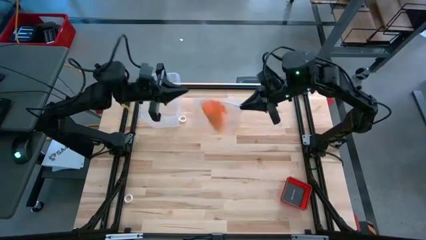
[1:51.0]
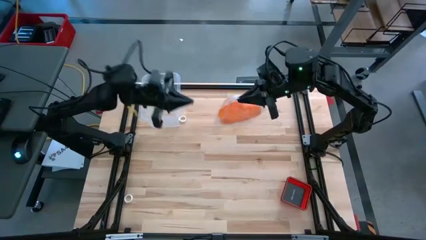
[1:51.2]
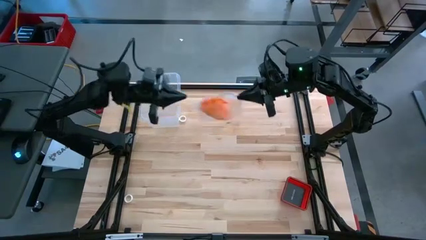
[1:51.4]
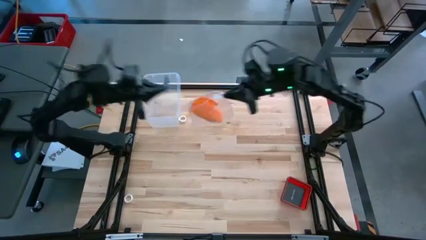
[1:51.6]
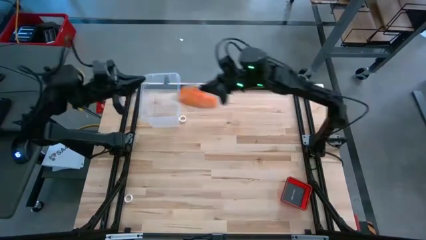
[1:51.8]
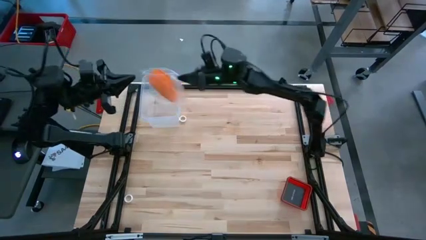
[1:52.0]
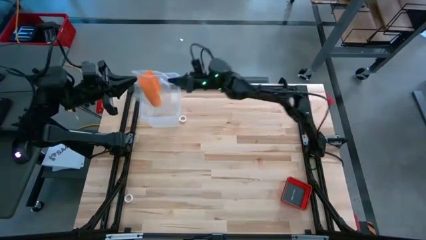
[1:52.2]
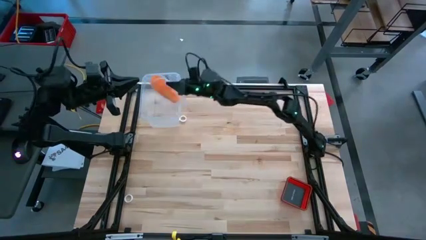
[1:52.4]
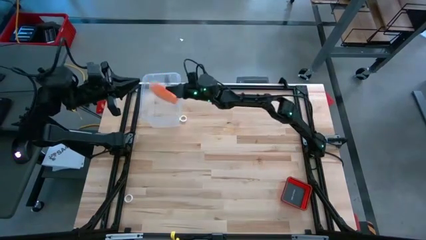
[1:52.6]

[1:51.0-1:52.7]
Task: Roll bandage
Put the zip bag into the transparent bin

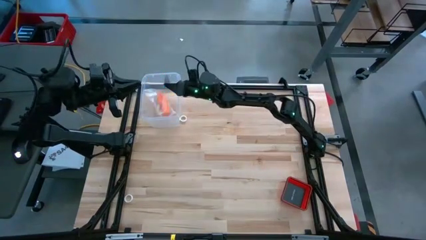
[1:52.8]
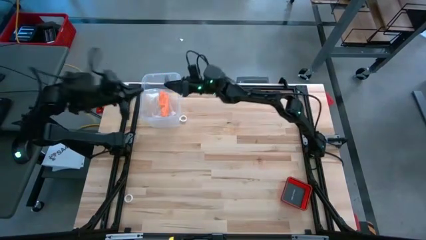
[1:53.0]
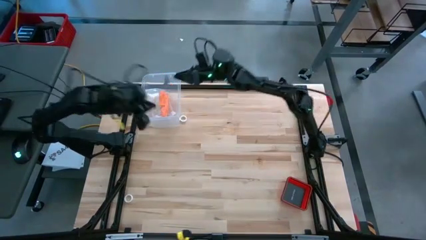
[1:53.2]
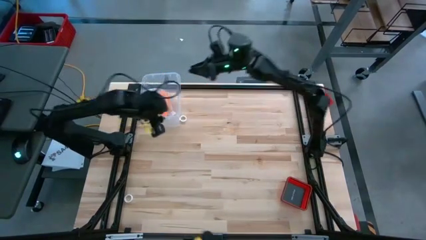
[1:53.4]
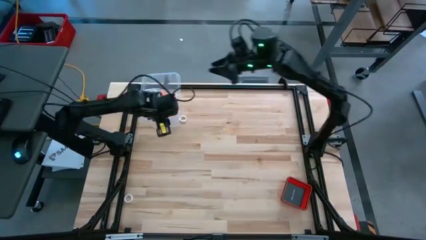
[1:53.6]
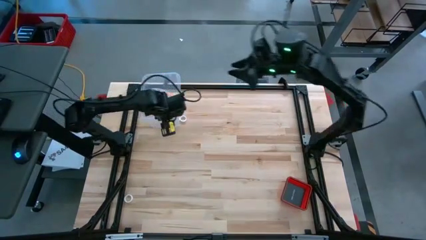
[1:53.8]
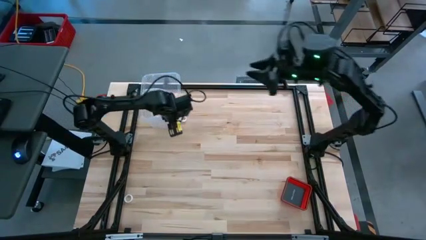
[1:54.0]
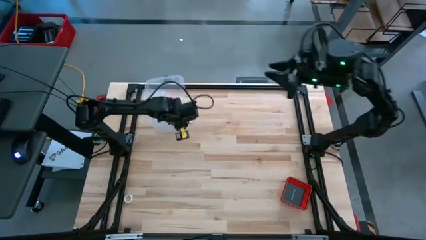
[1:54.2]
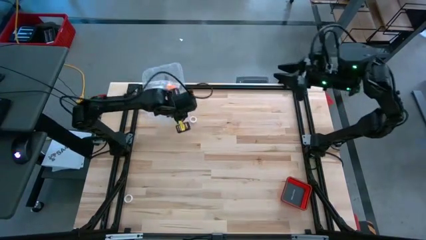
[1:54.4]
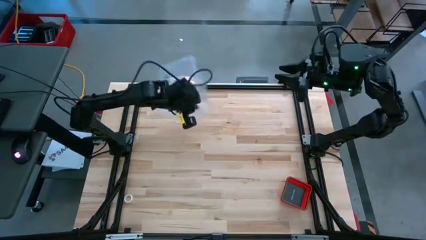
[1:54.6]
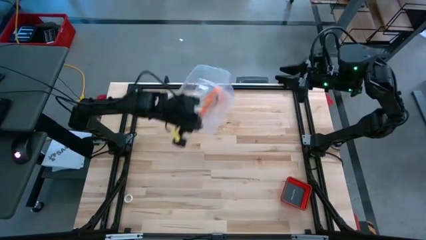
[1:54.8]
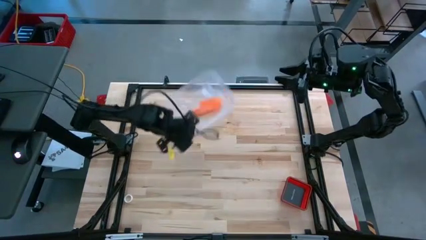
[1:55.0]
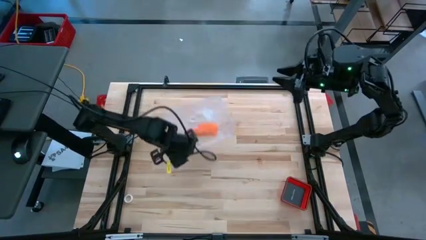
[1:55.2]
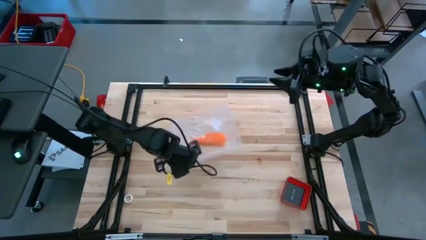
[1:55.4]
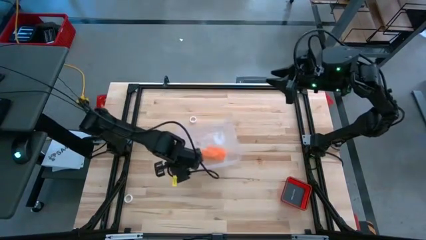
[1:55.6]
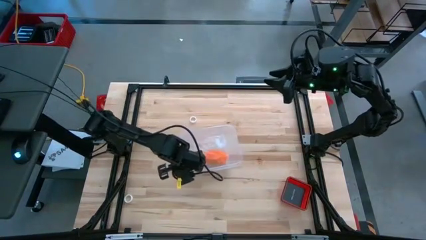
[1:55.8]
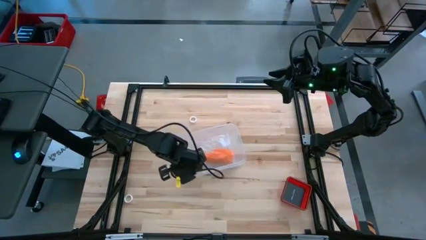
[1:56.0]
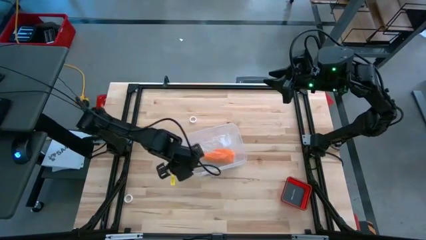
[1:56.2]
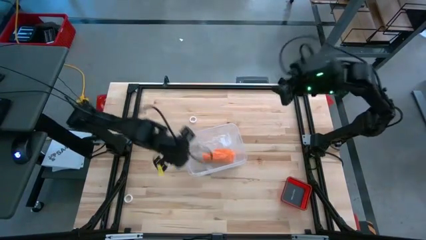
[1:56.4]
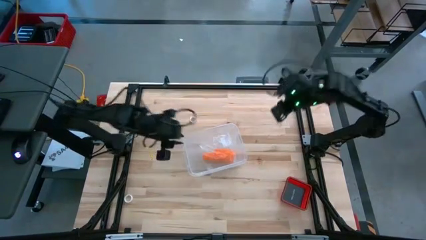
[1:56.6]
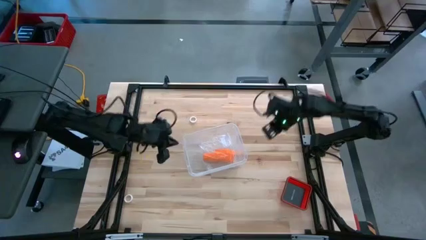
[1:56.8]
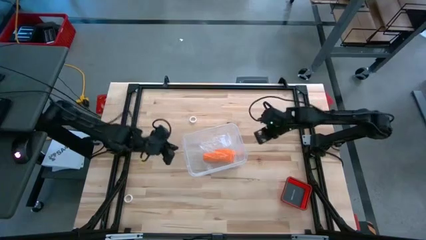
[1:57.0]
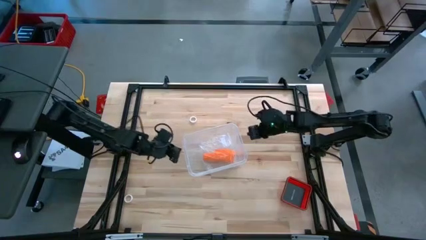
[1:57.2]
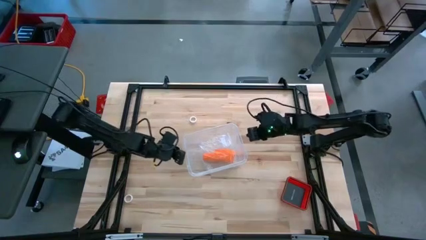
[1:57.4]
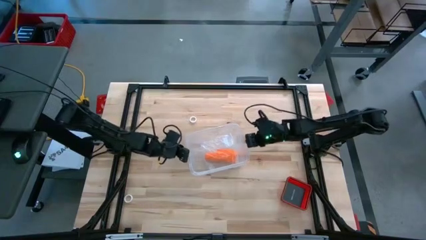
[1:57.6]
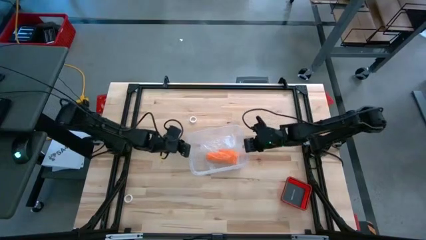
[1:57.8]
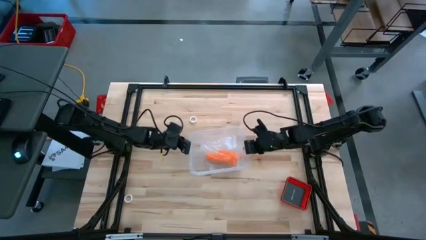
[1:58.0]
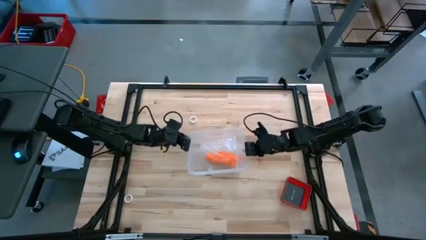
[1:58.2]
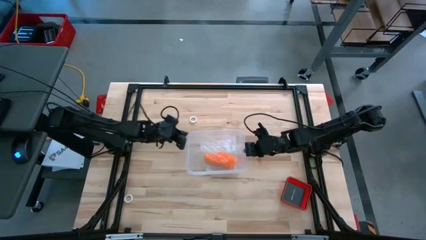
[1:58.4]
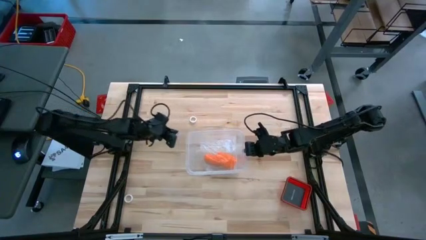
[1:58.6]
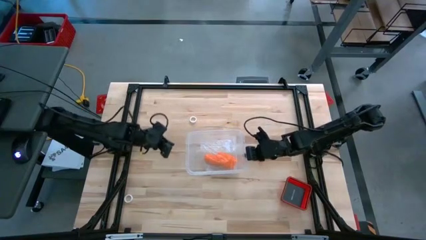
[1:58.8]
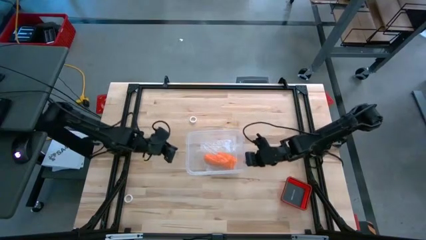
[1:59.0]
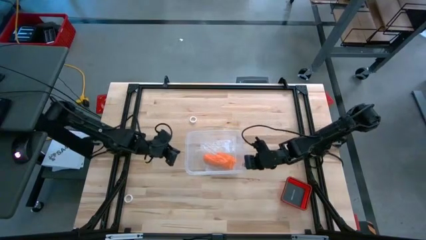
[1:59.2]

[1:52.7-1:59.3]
Move the transparent bin to the center of the table

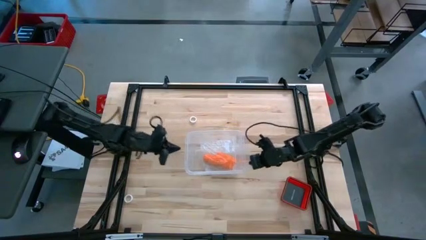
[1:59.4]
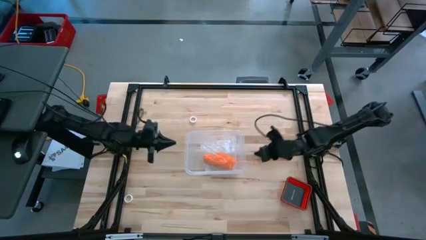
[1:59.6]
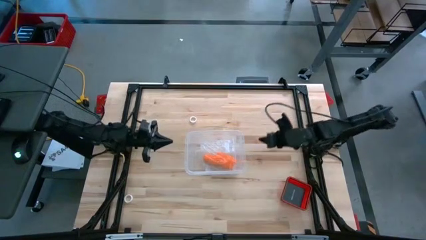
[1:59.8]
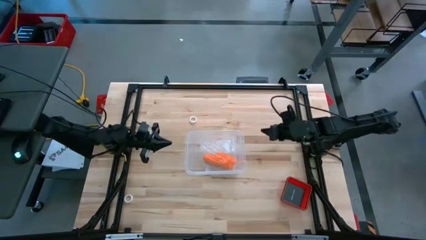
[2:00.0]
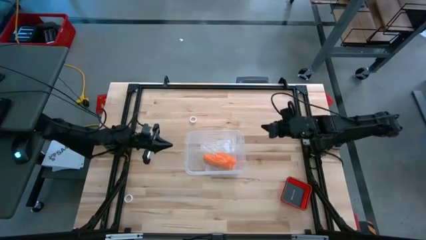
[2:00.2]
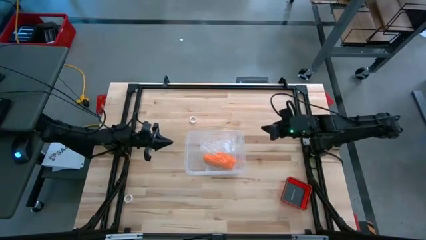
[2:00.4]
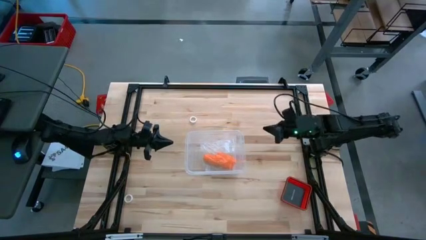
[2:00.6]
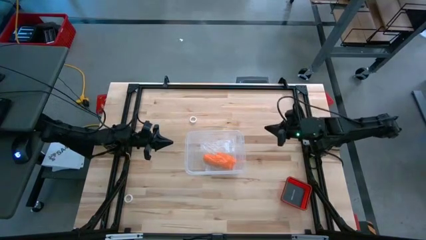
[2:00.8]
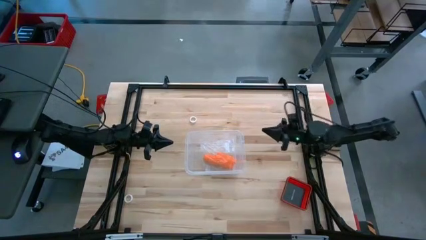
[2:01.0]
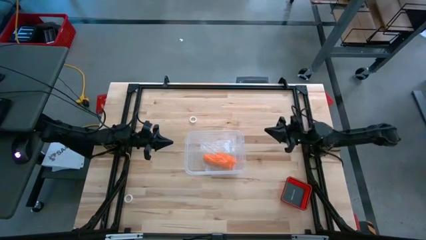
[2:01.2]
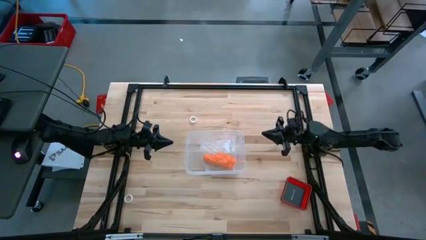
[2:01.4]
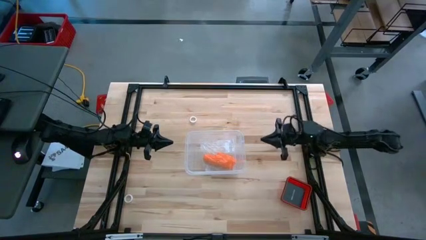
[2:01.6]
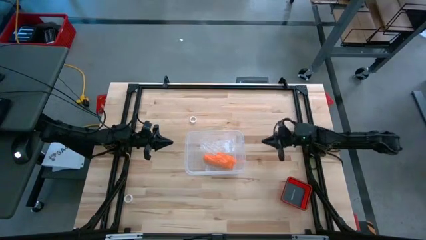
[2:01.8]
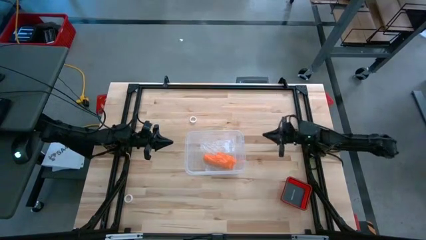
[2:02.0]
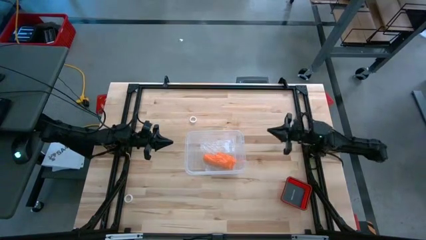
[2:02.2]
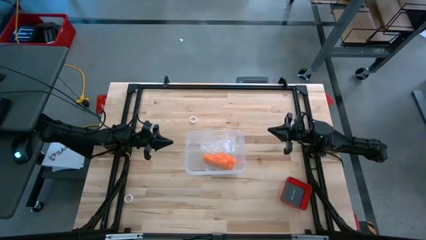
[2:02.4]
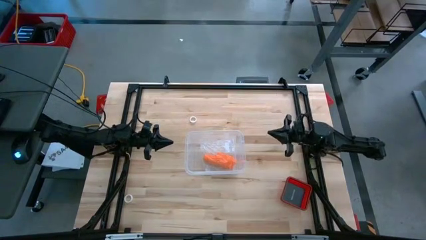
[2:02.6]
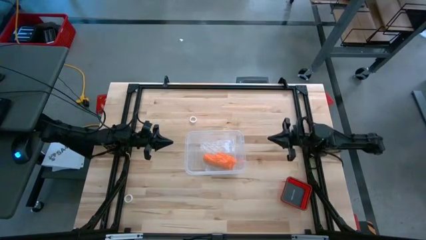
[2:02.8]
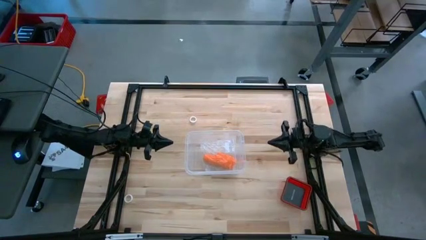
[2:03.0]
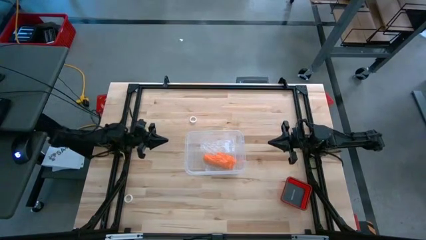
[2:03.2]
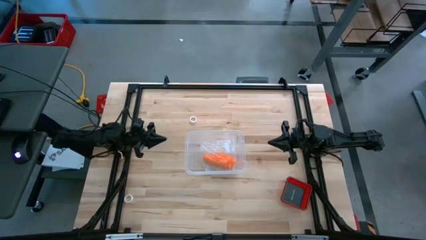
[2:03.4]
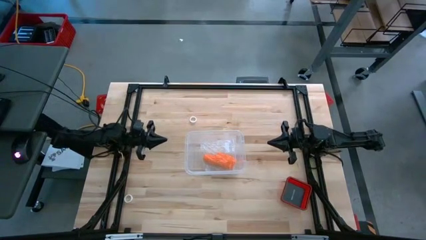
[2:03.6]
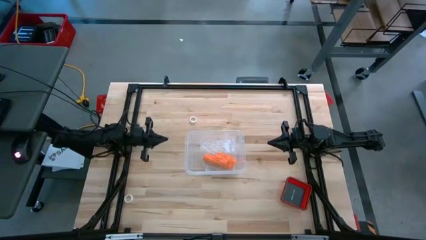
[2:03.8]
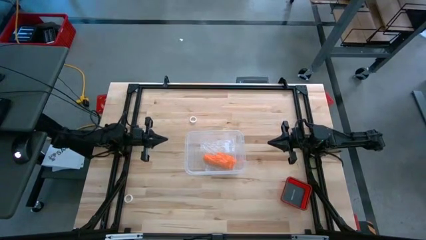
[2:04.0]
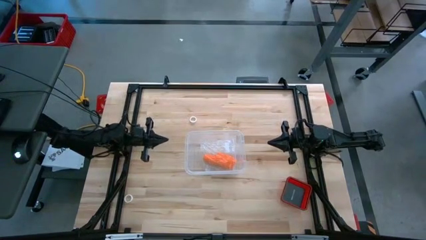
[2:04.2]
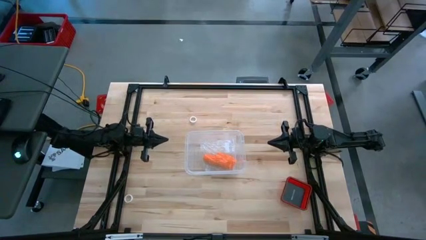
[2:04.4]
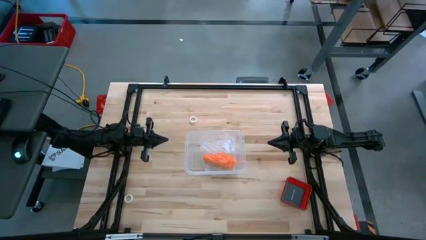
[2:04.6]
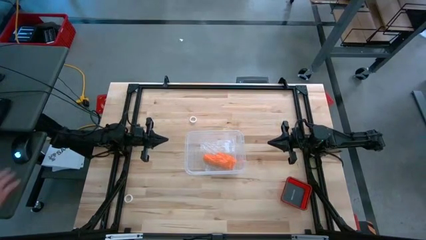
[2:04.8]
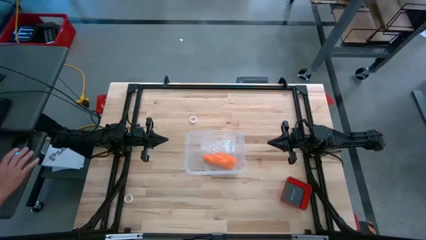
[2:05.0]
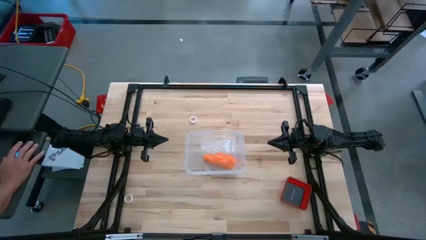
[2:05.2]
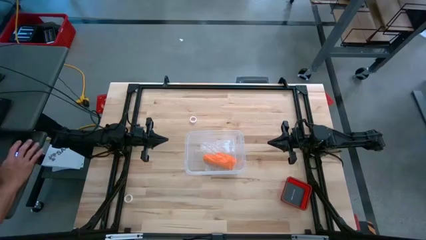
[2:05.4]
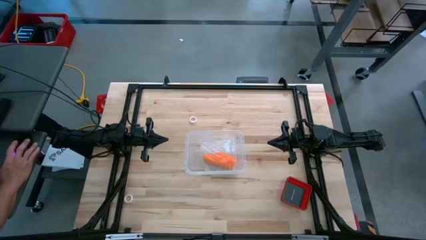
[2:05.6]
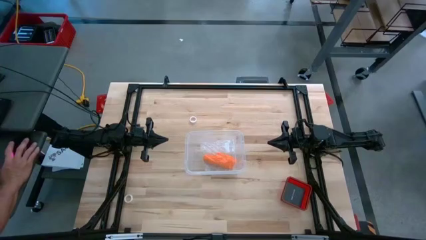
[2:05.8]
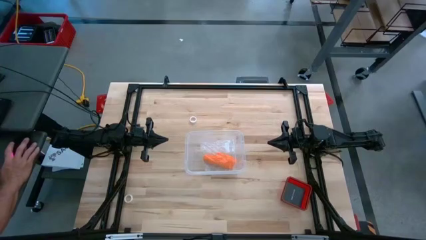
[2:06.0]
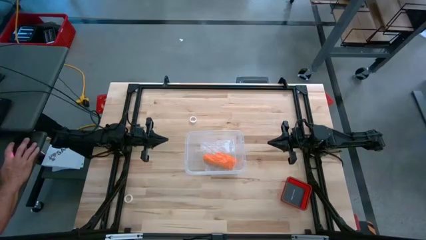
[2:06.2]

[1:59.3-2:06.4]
Return to Home position
